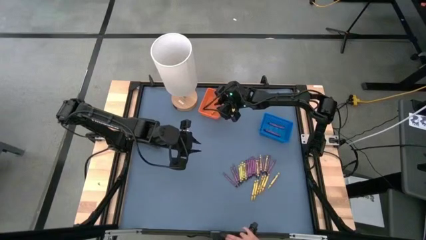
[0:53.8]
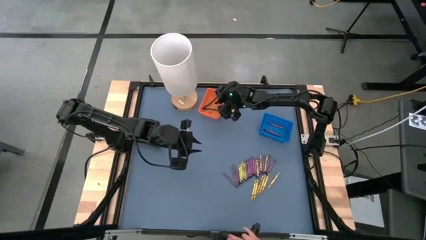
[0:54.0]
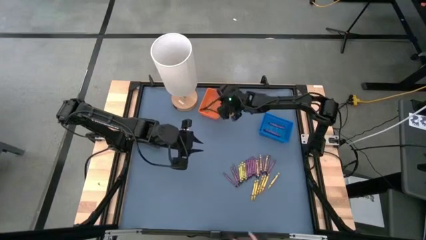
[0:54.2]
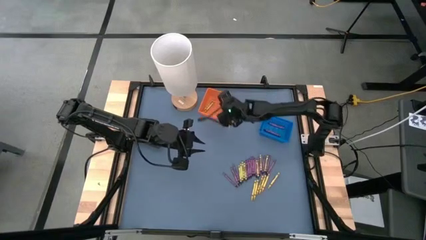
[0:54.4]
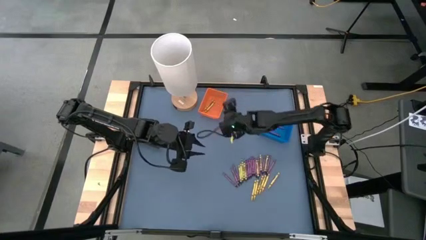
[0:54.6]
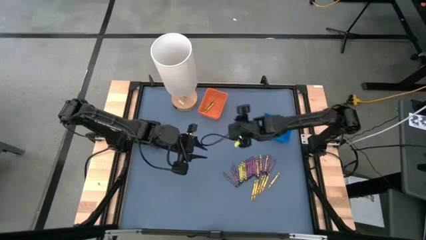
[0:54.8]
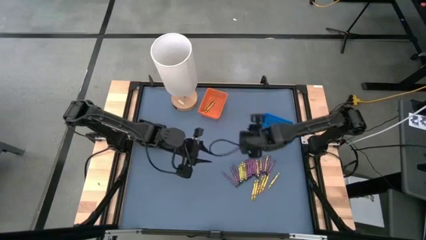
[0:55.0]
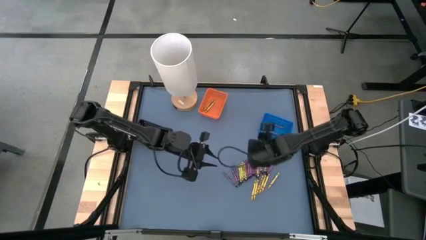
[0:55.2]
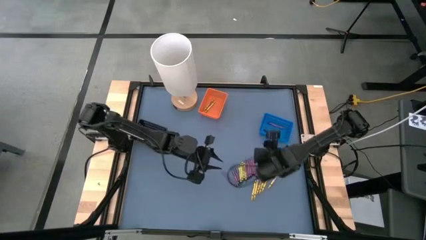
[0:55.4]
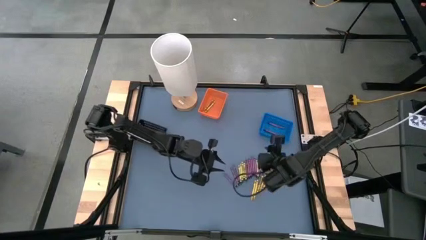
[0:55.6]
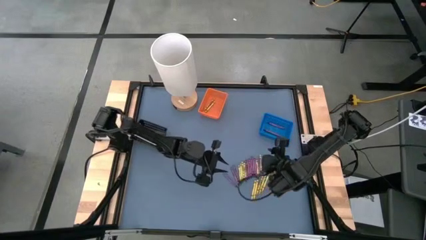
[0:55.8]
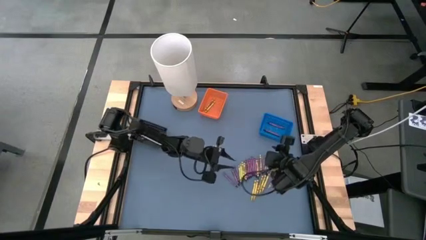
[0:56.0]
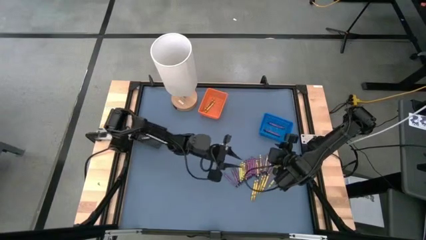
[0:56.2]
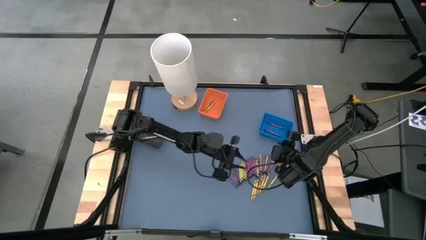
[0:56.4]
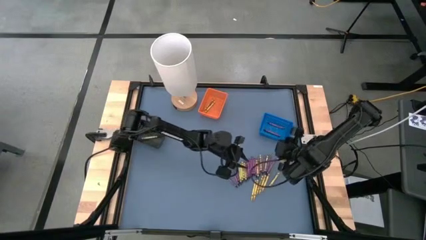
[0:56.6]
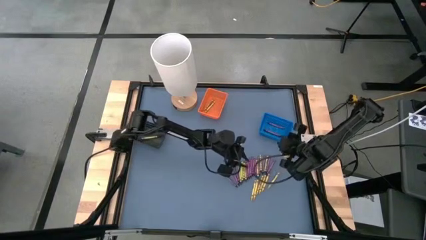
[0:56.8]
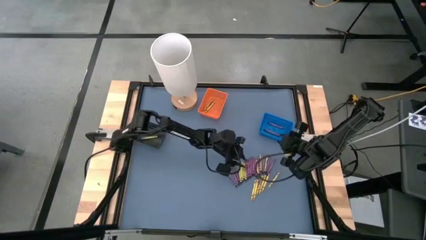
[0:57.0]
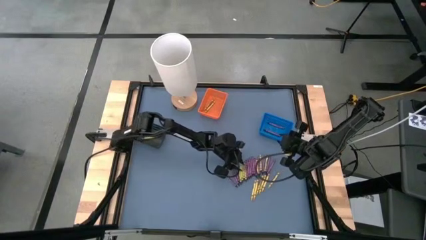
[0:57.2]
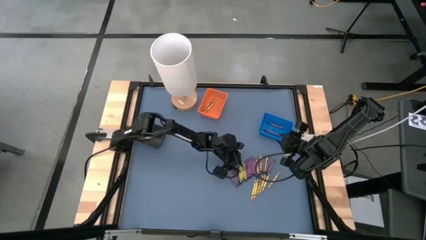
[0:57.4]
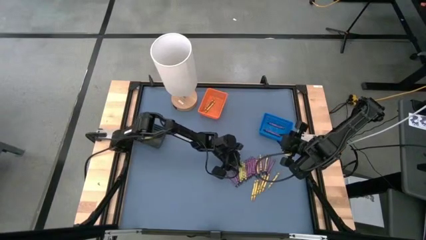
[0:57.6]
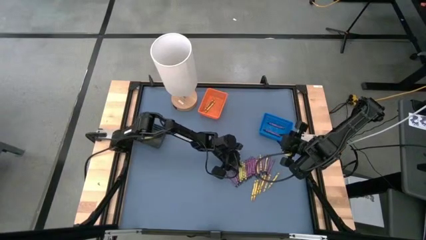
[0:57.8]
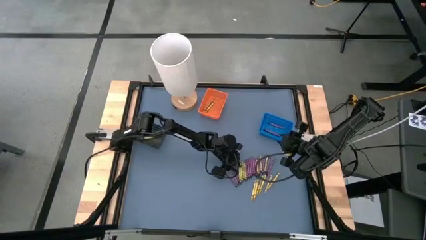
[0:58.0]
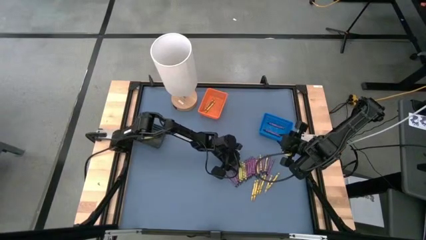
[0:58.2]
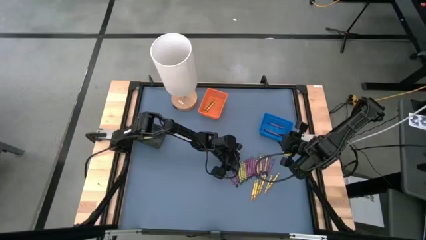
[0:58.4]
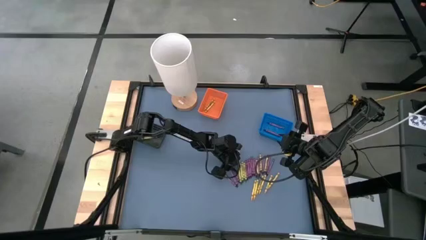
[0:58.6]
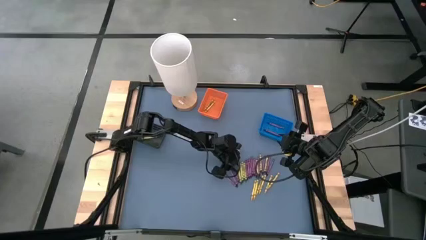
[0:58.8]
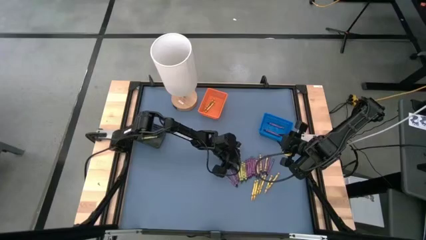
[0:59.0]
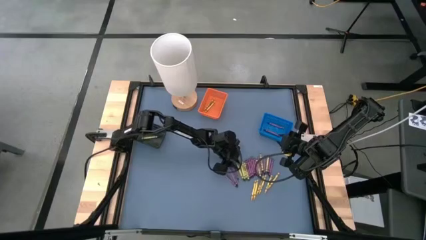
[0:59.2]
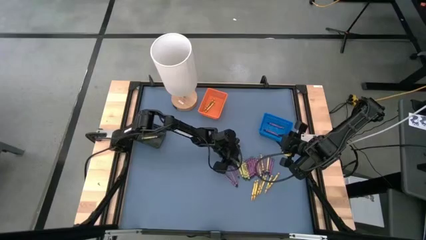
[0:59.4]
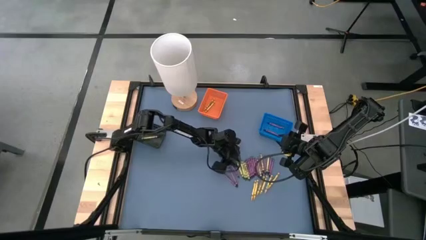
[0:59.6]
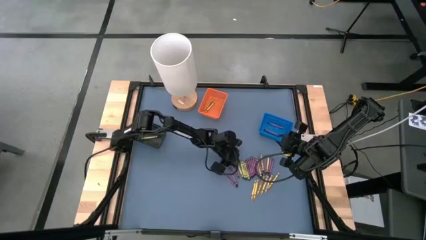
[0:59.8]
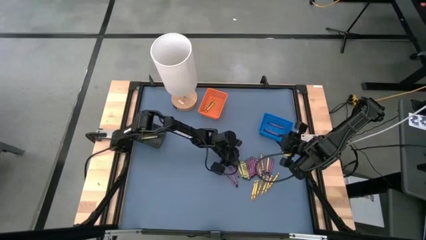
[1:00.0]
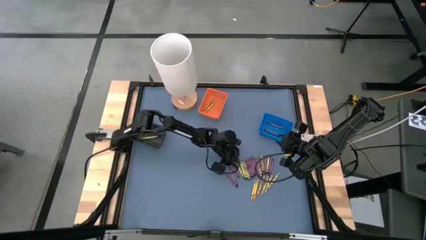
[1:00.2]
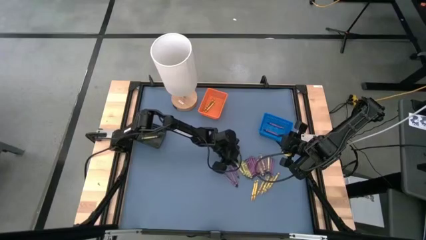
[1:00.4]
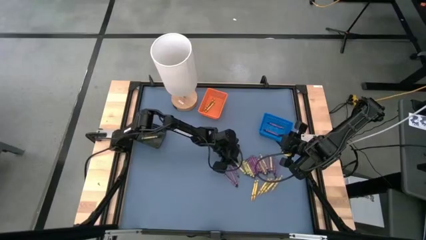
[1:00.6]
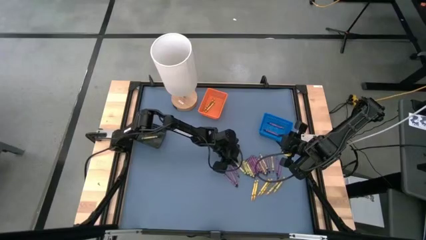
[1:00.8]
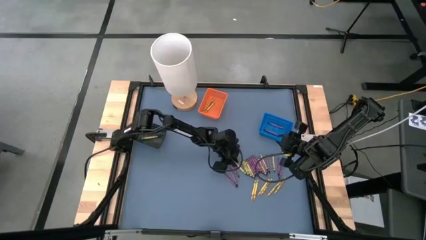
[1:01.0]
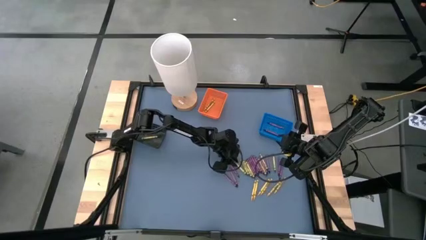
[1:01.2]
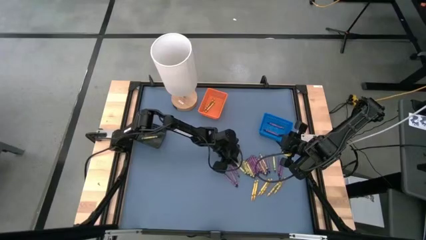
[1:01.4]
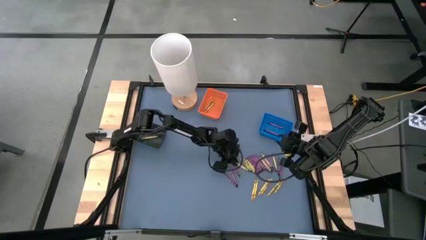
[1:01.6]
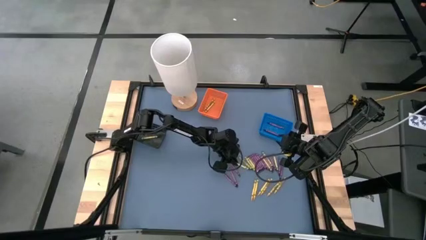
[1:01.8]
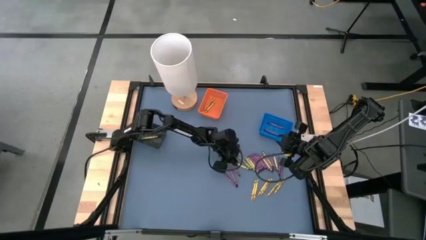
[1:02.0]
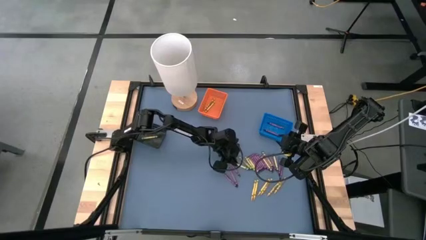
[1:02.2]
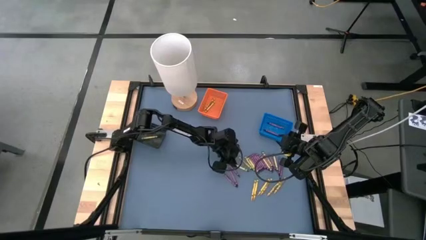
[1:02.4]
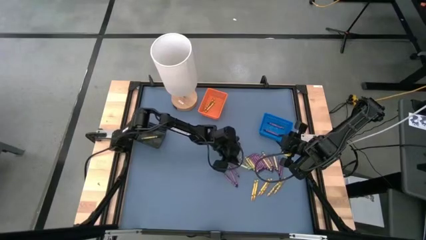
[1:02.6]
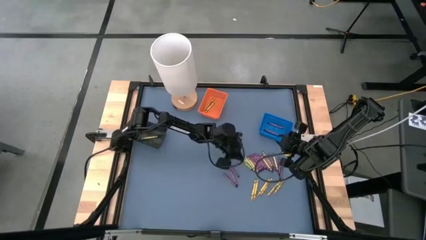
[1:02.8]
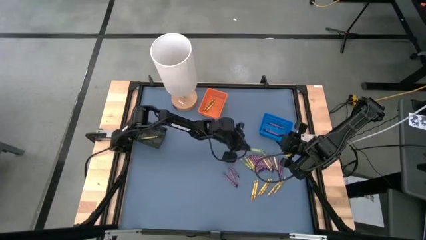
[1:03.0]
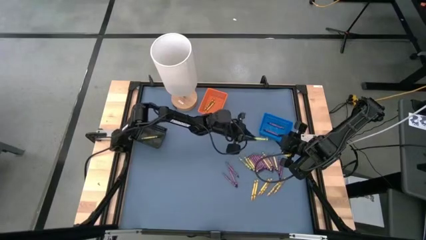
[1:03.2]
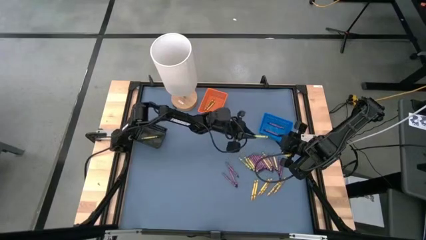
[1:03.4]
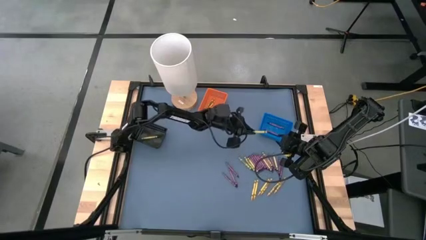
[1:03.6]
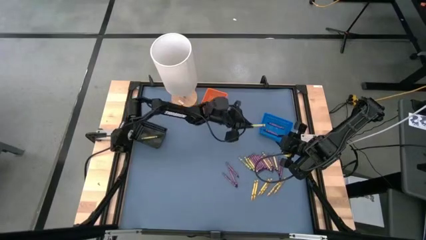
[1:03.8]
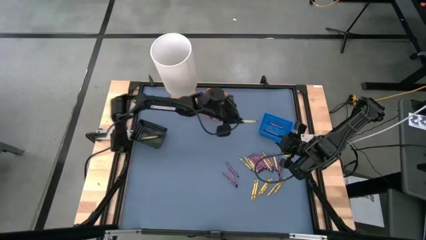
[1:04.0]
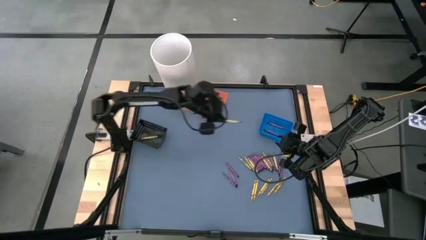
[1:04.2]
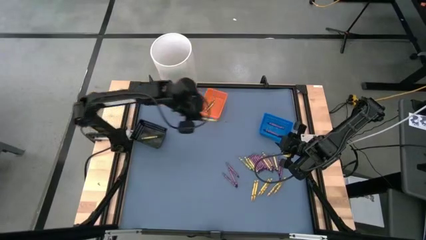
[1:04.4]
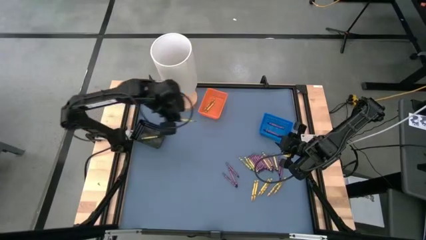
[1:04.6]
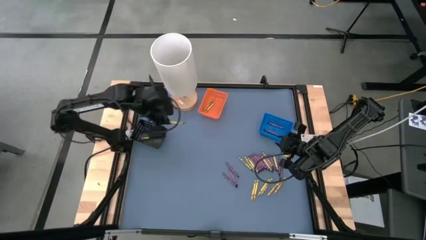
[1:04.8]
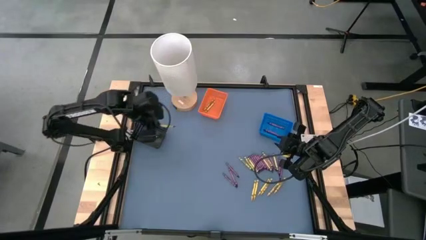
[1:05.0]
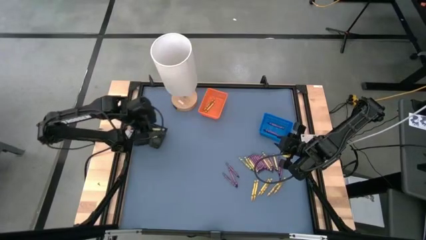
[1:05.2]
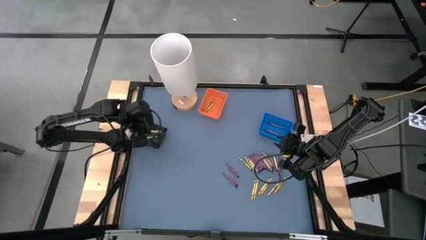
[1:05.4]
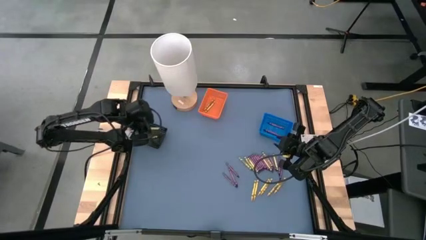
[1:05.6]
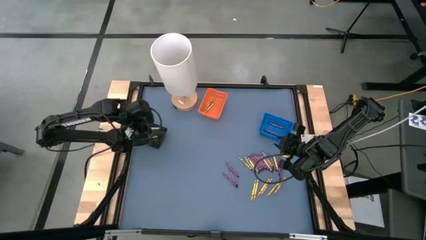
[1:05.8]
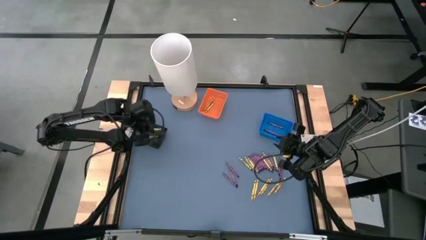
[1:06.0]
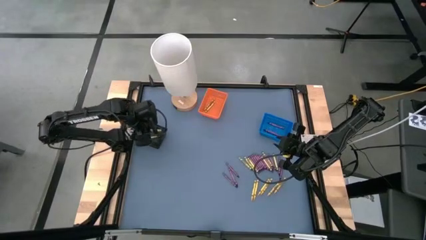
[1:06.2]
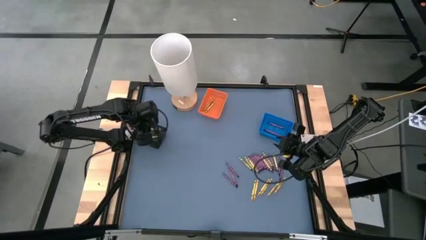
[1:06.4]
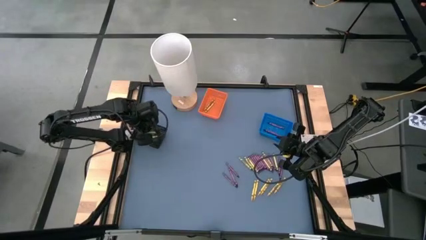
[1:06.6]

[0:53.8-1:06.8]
Task: Sort crayons
Put the green crayon into the black basket
